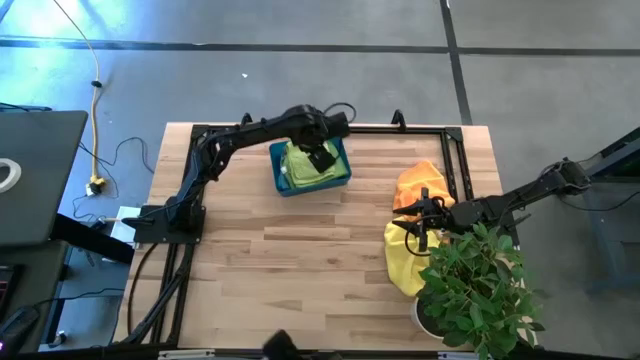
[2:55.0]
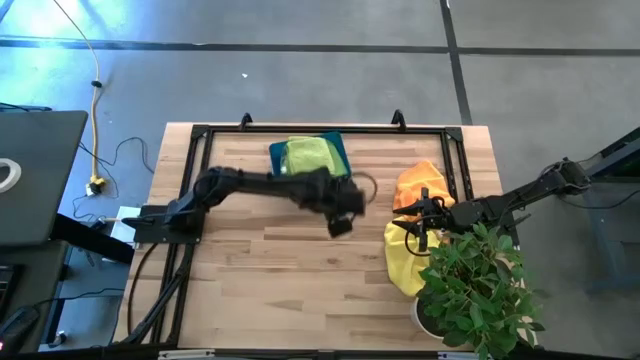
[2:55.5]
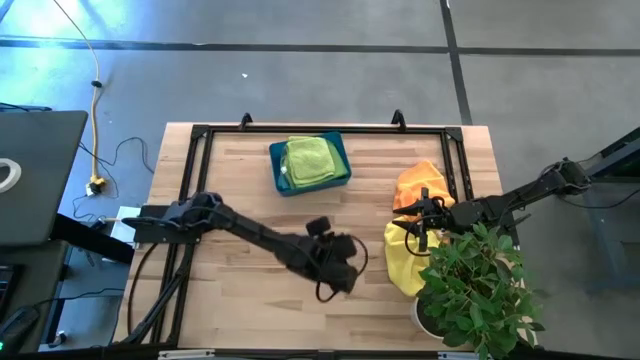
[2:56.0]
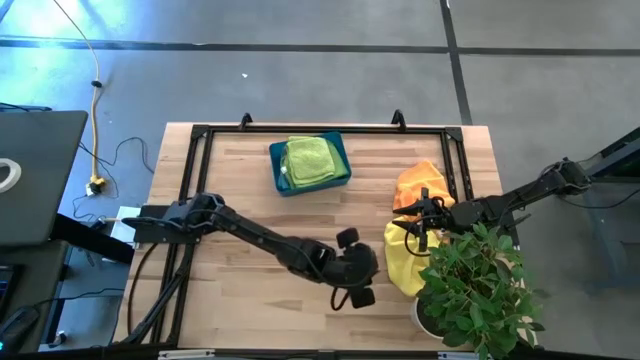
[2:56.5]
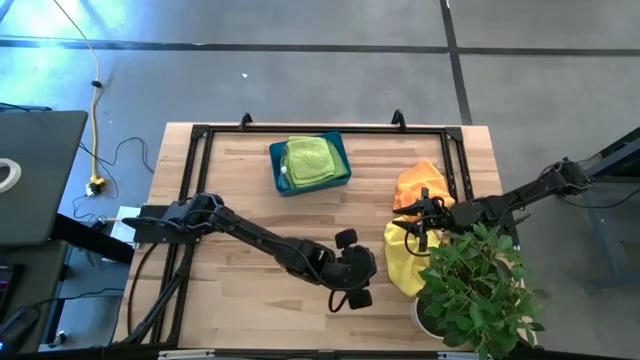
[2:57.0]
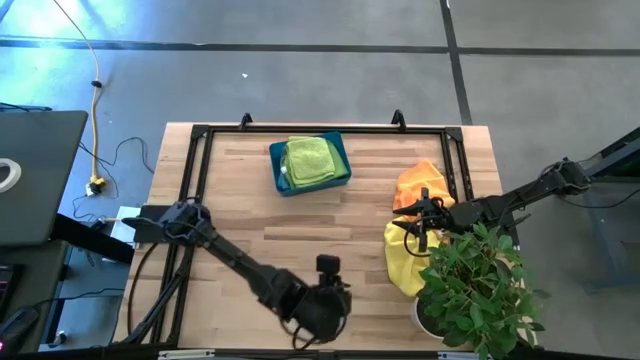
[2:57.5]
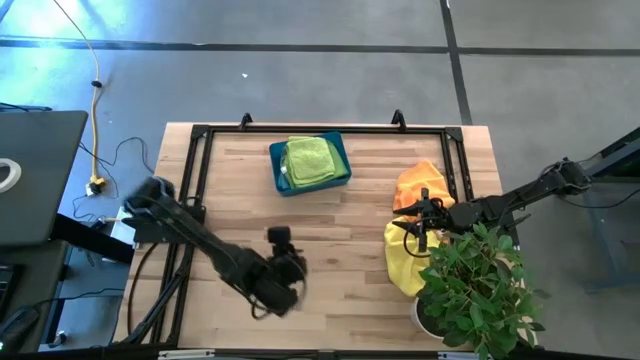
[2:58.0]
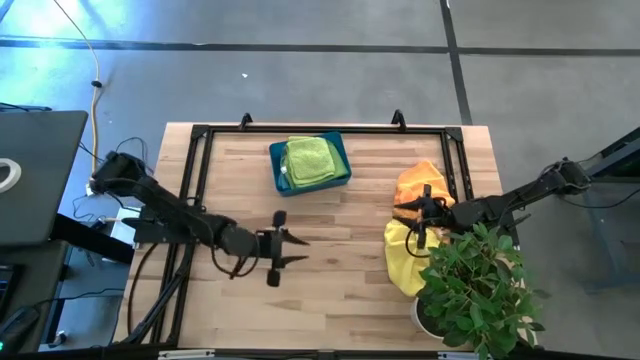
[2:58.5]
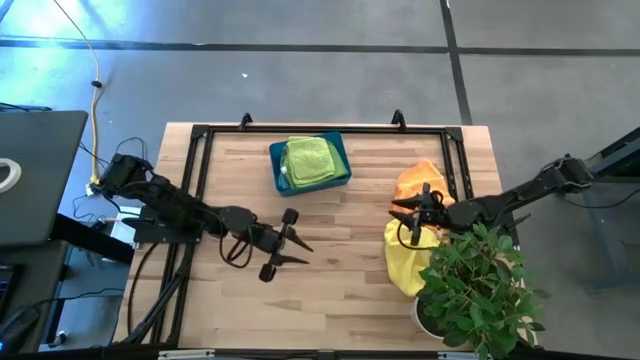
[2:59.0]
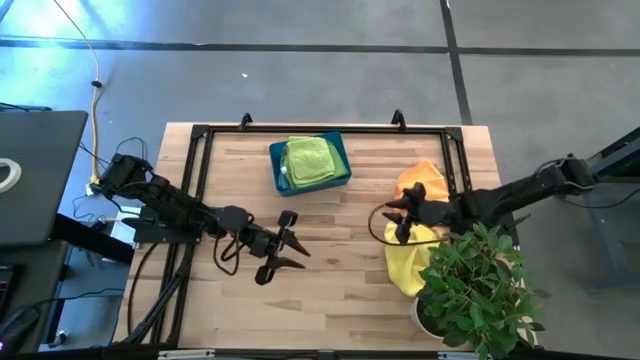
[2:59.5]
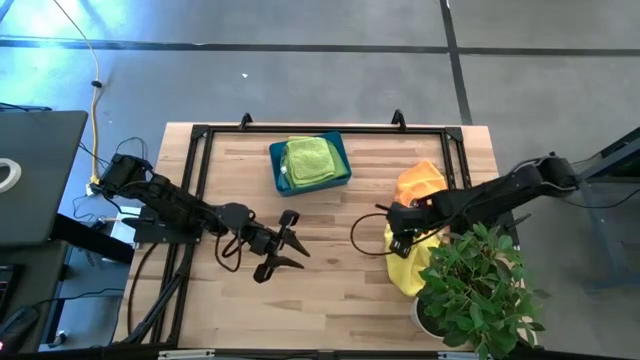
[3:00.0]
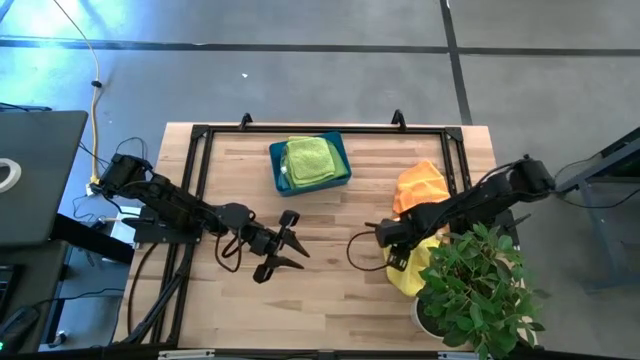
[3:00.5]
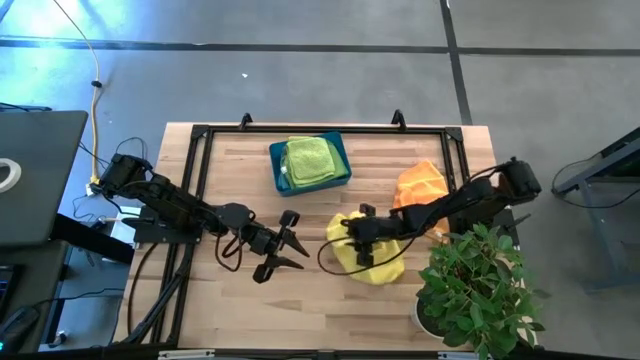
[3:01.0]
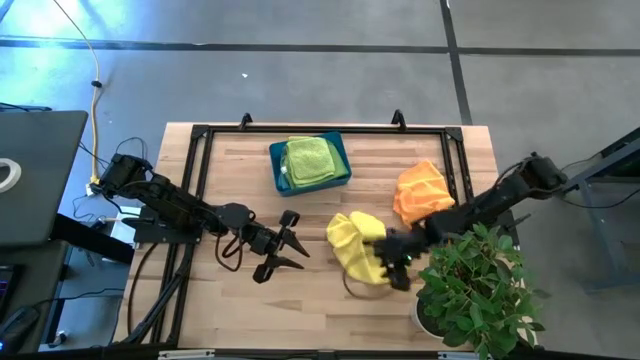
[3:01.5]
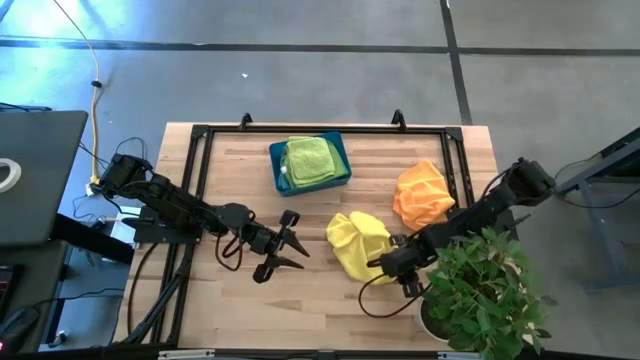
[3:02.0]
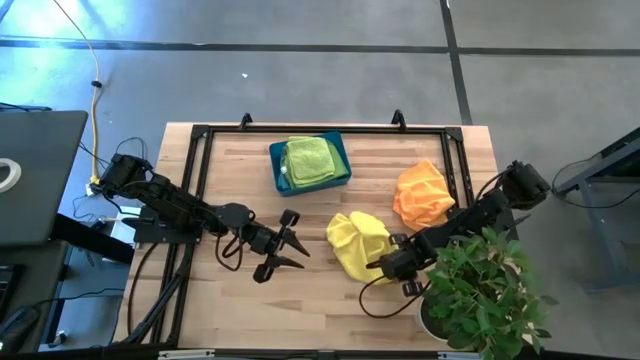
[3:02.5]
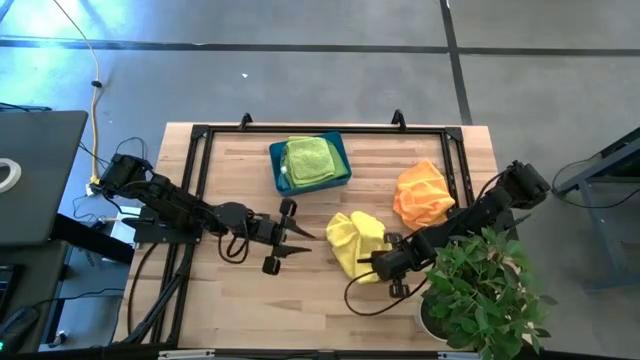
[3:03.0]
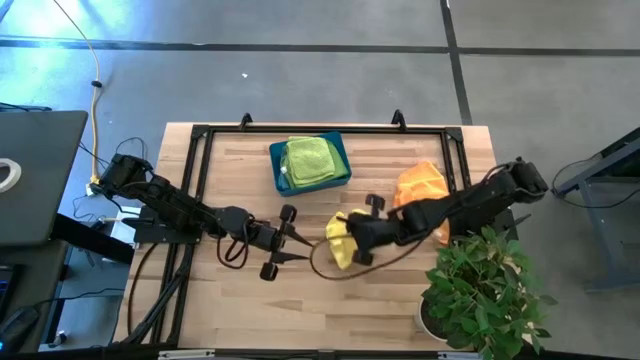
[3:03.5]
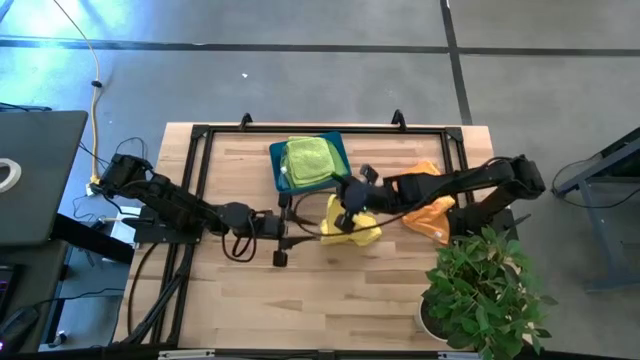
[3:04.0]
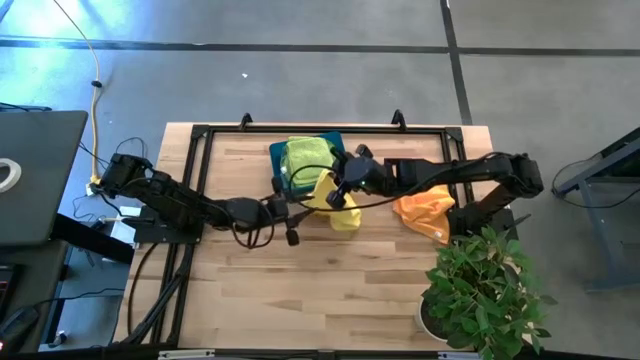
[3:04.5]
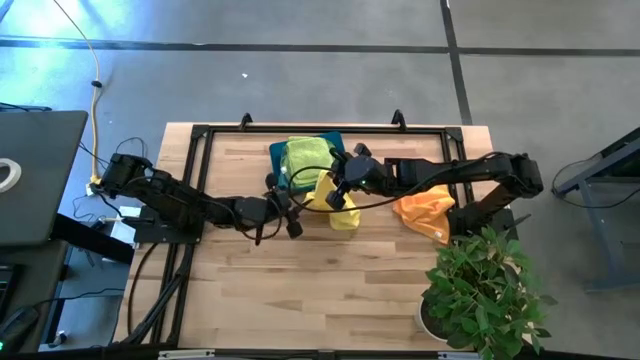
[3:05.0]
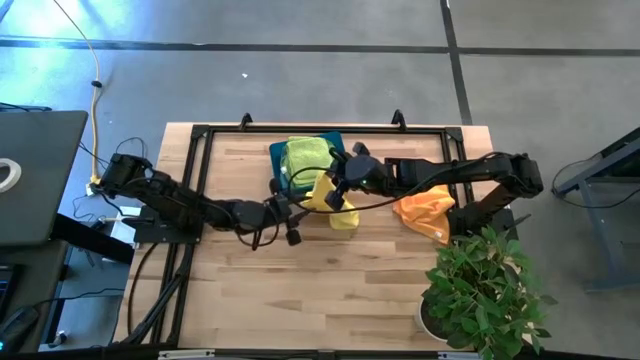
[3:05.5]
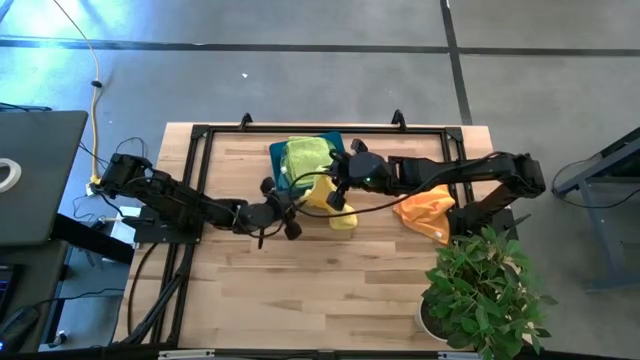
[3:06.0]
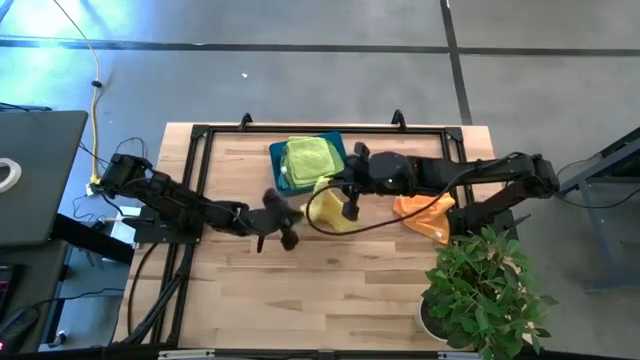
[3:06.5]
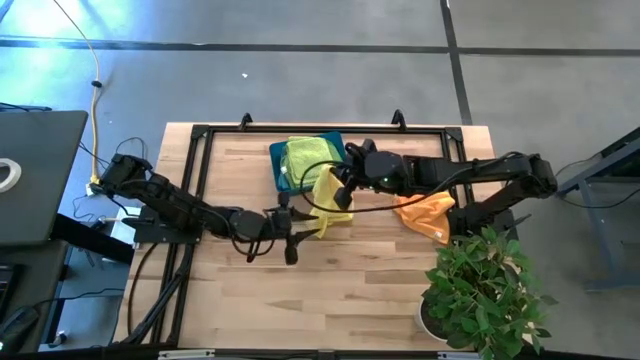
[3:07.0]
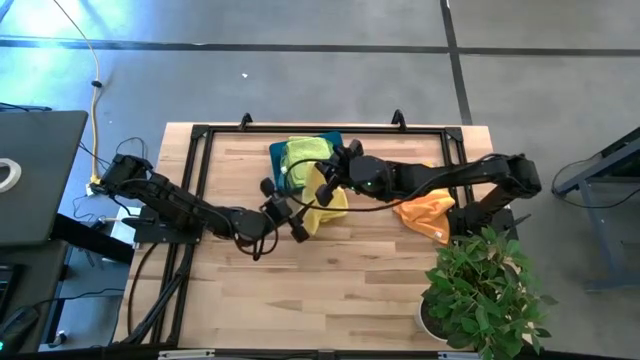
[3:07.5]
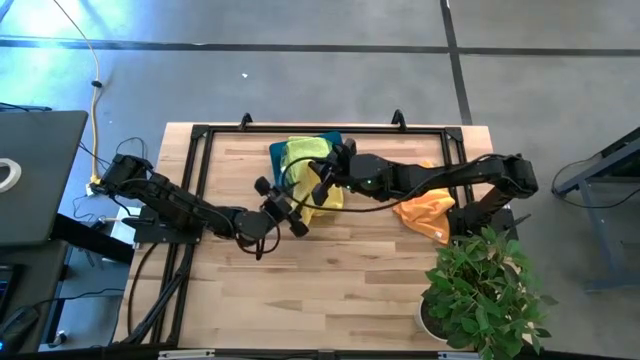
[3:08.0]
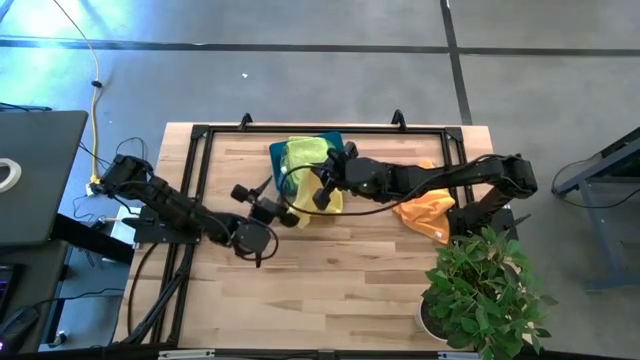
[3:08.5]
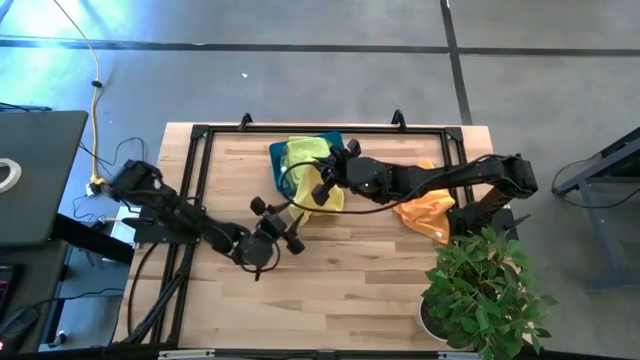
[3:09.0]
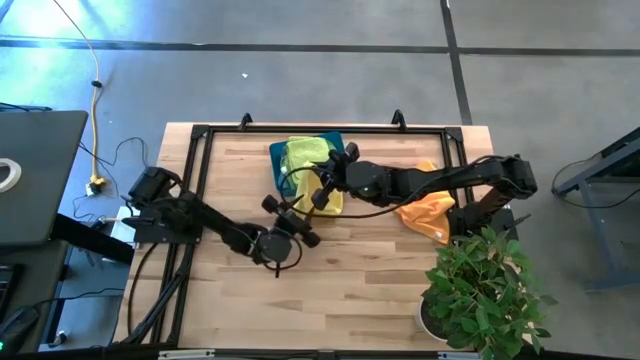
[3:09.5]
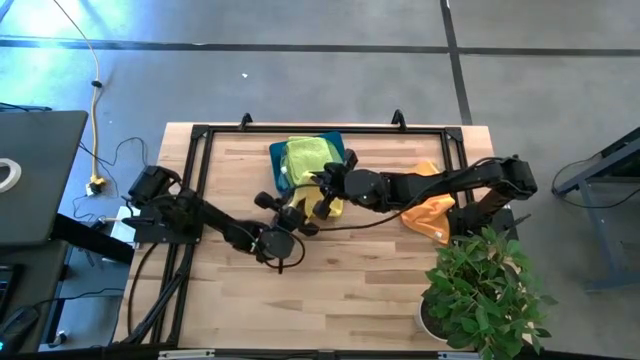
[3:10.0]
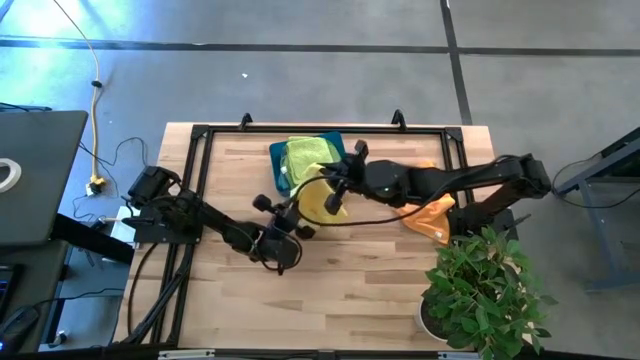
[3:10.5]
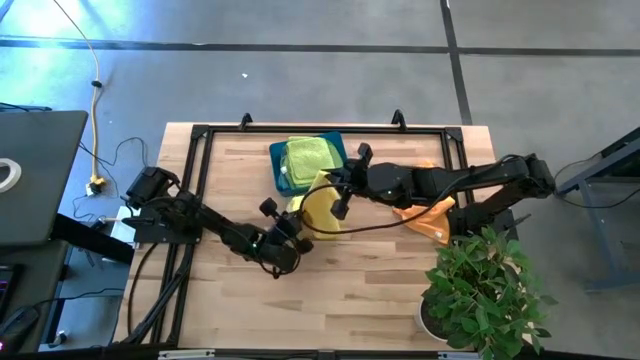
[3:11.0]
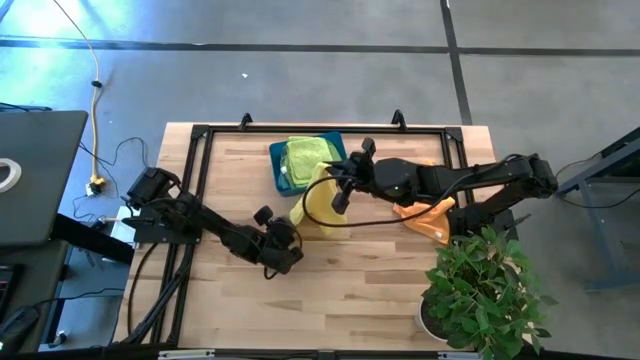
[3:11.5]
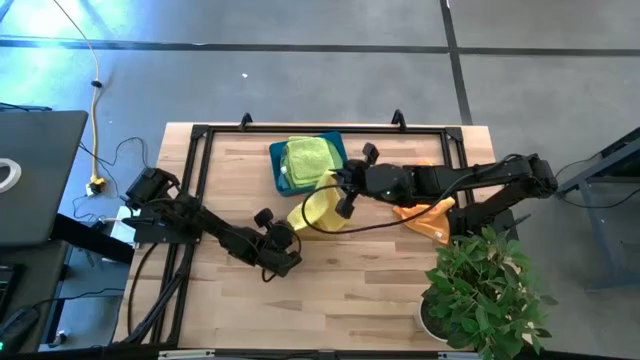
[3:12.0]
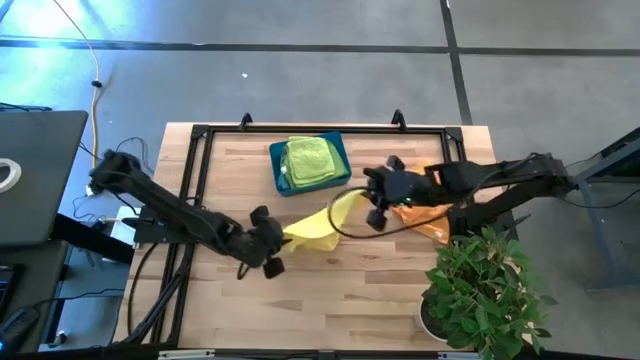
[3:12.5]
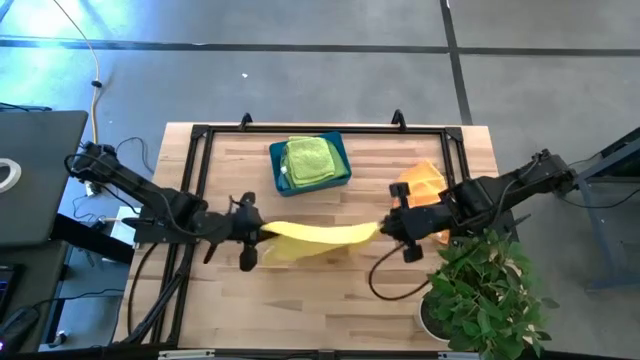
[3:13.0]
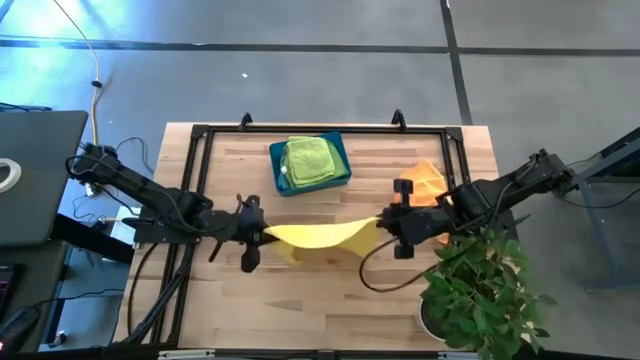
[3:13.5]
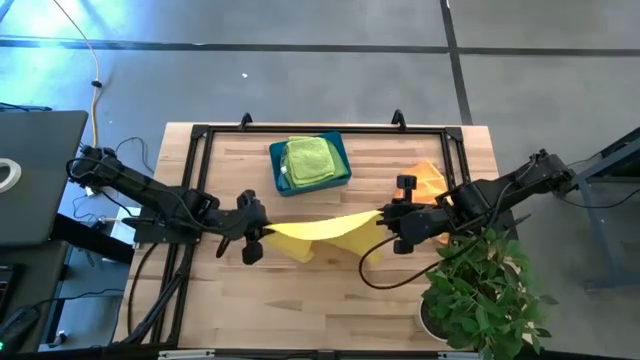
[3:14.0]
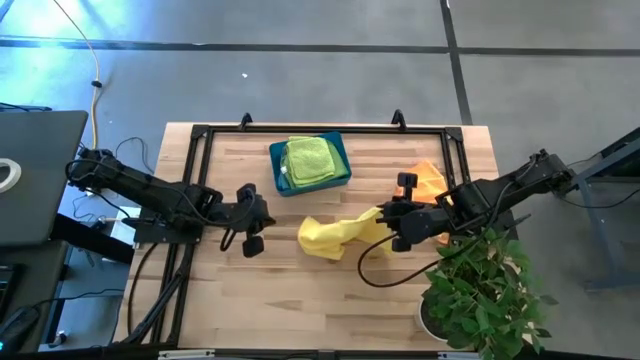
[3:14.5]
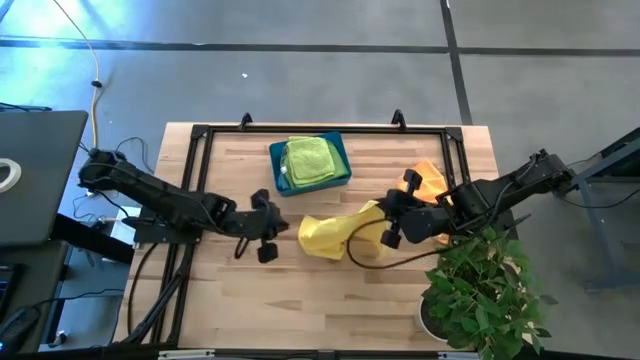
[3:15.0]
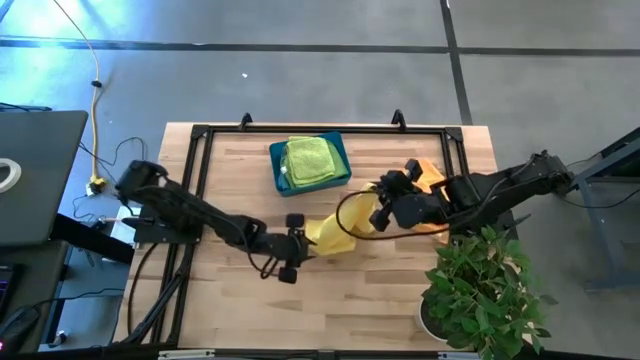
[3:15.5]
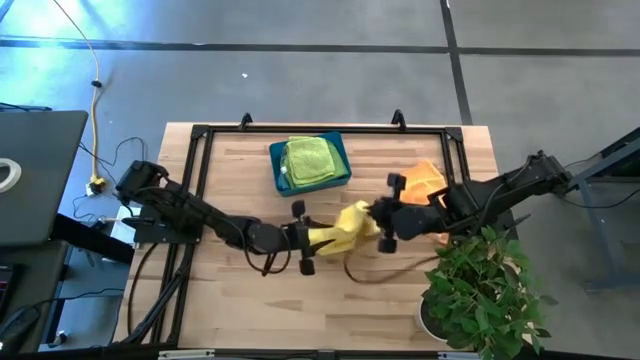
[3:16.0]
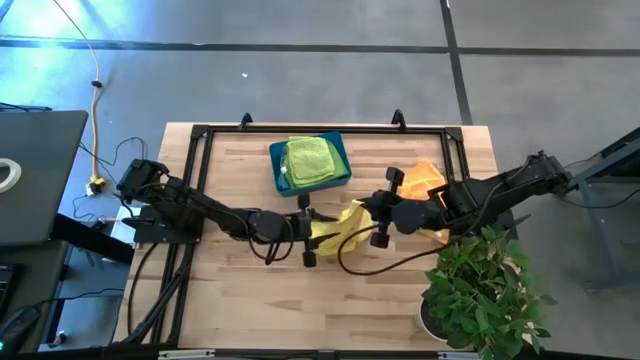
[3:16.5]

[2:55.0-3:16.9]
Task: Fold microfiber towels
Fold the yellow microfiber cloth
